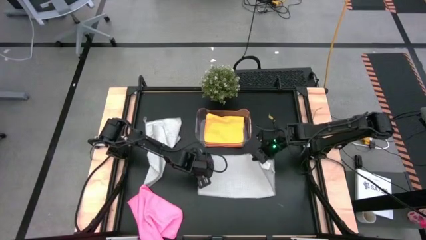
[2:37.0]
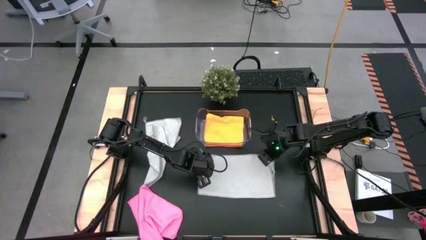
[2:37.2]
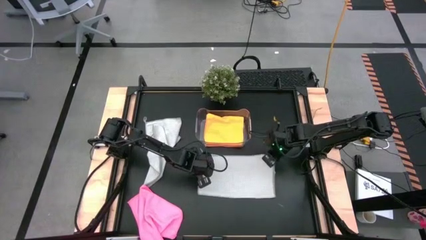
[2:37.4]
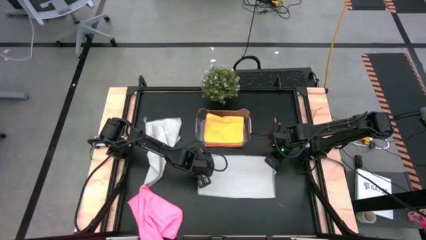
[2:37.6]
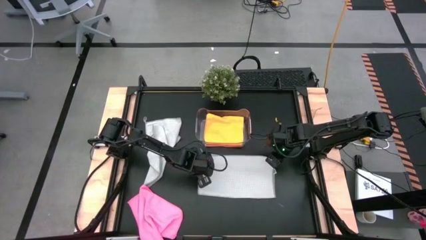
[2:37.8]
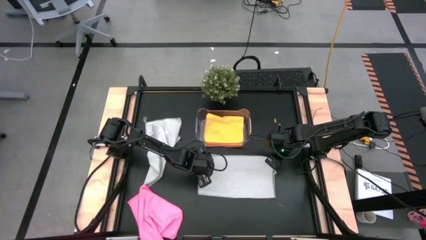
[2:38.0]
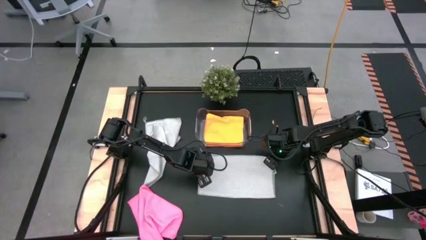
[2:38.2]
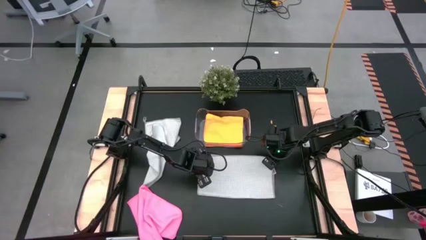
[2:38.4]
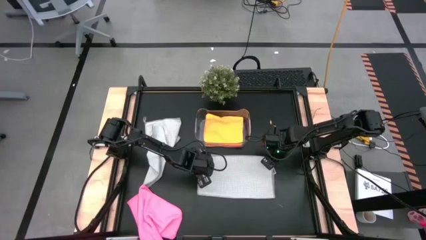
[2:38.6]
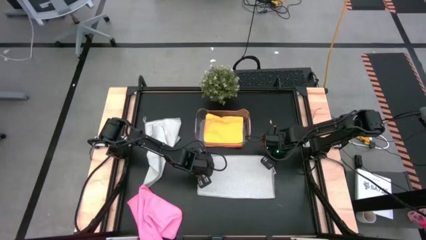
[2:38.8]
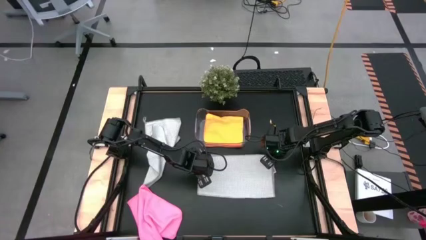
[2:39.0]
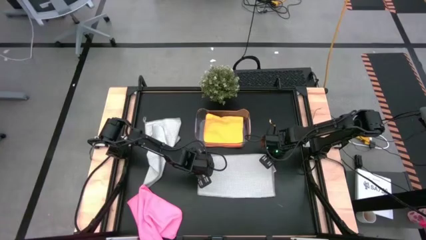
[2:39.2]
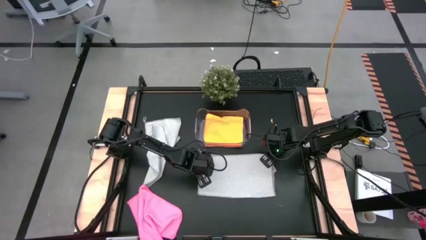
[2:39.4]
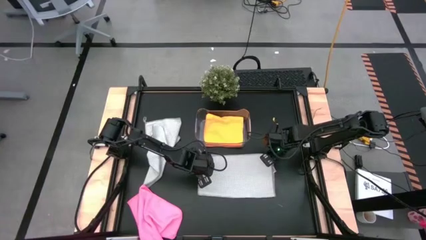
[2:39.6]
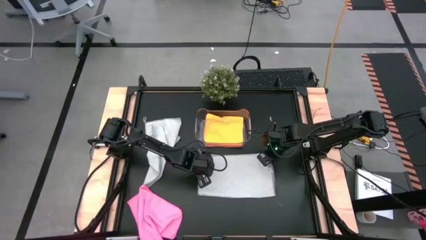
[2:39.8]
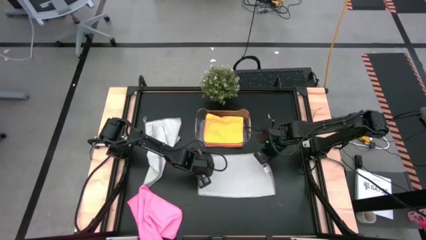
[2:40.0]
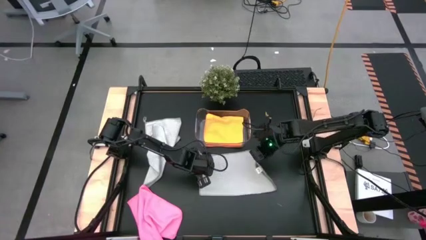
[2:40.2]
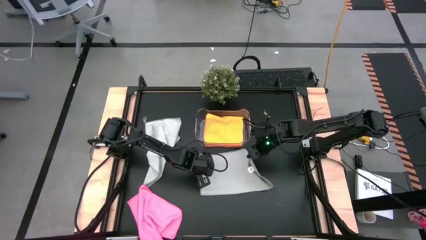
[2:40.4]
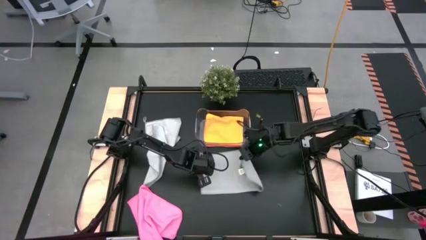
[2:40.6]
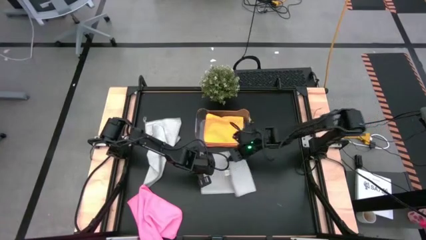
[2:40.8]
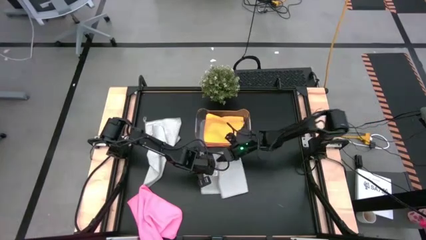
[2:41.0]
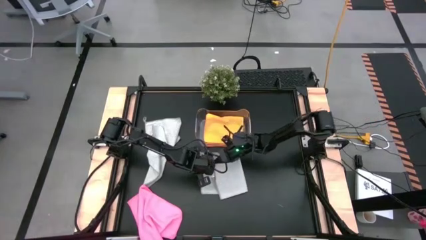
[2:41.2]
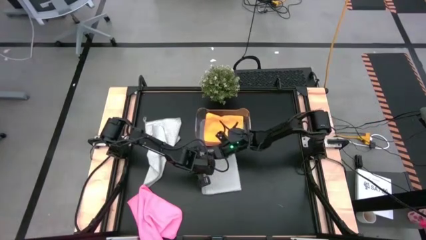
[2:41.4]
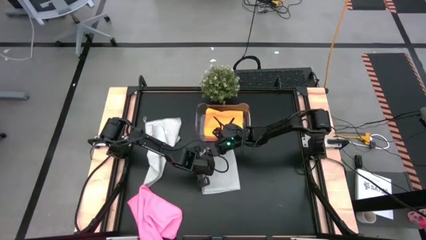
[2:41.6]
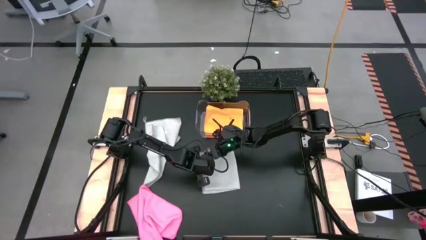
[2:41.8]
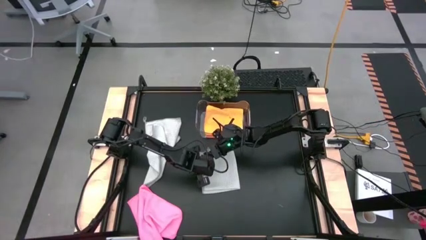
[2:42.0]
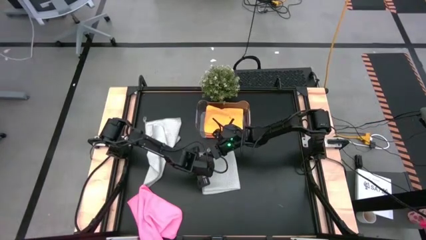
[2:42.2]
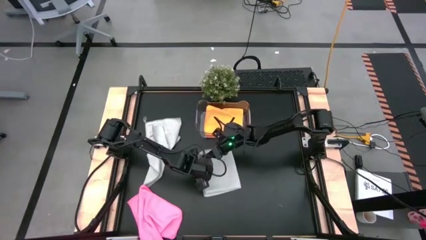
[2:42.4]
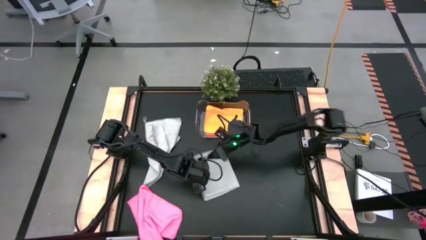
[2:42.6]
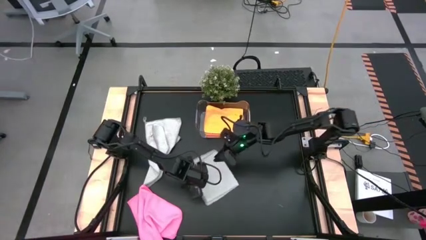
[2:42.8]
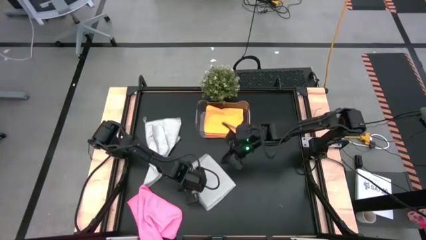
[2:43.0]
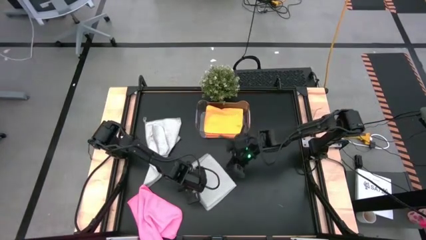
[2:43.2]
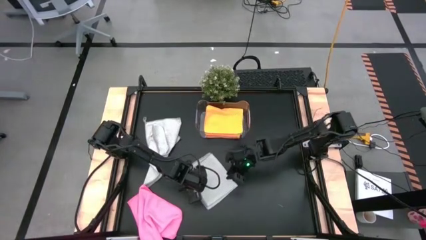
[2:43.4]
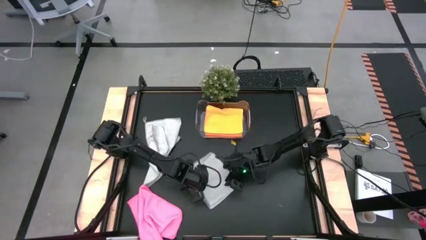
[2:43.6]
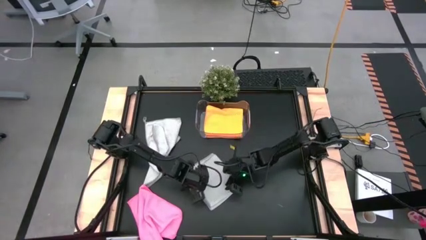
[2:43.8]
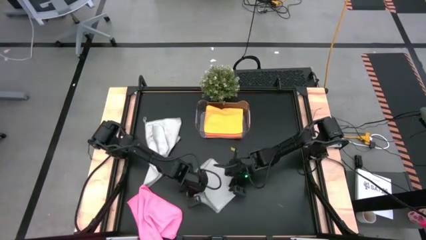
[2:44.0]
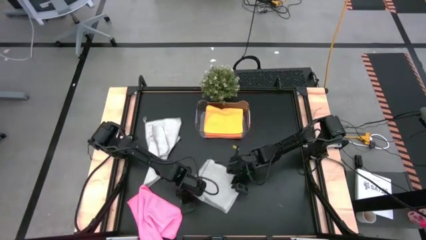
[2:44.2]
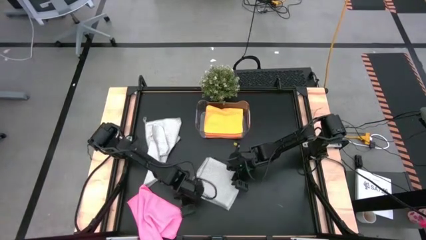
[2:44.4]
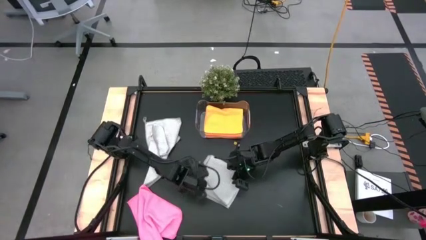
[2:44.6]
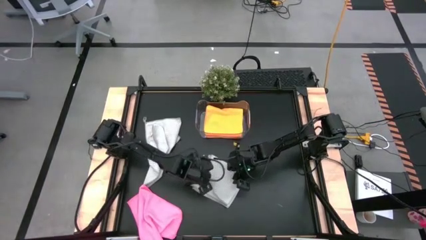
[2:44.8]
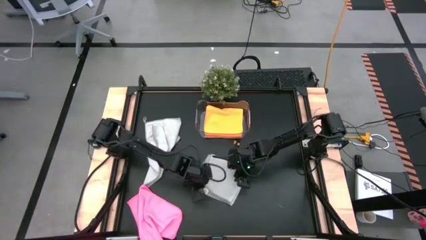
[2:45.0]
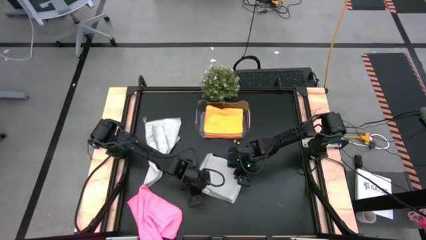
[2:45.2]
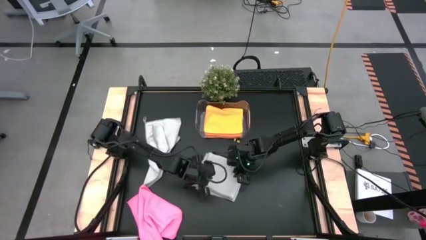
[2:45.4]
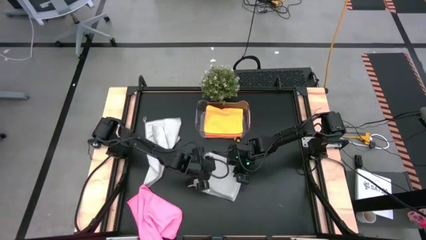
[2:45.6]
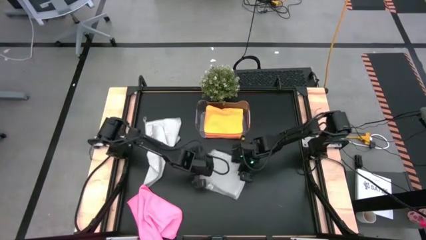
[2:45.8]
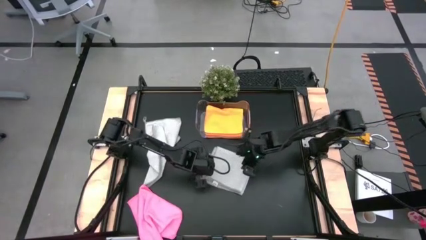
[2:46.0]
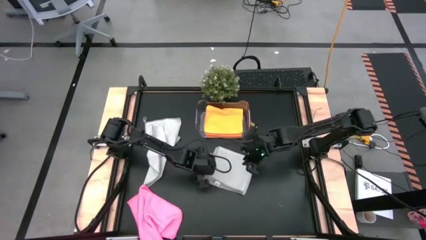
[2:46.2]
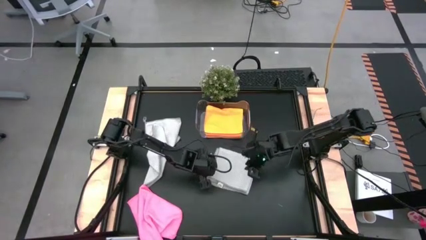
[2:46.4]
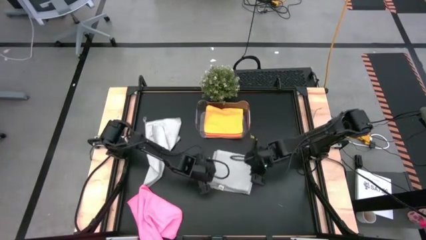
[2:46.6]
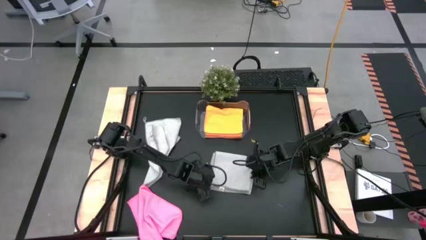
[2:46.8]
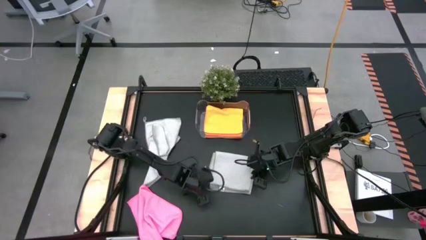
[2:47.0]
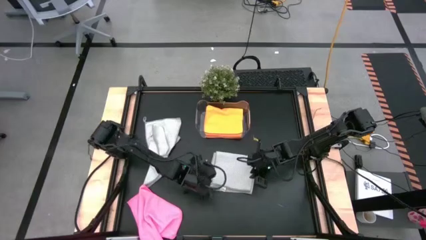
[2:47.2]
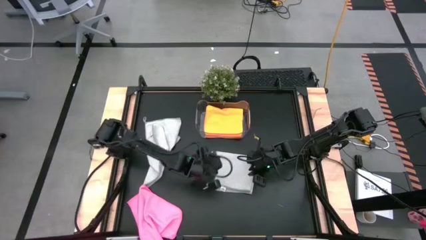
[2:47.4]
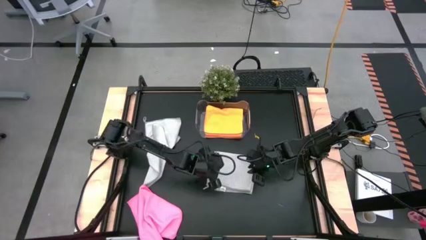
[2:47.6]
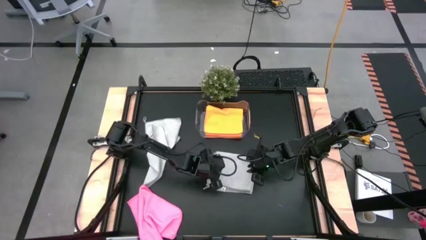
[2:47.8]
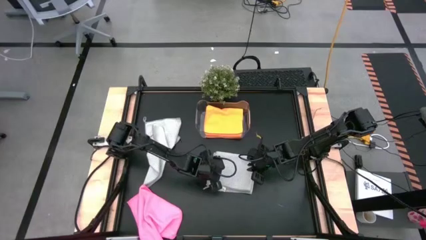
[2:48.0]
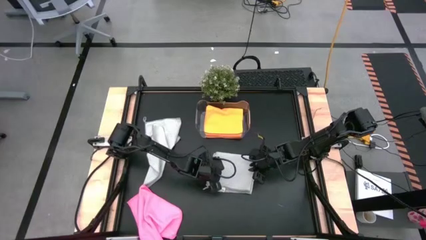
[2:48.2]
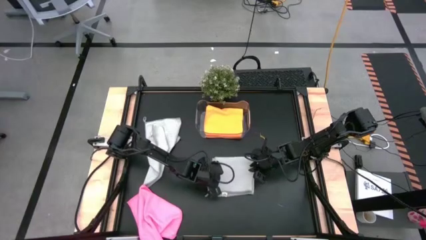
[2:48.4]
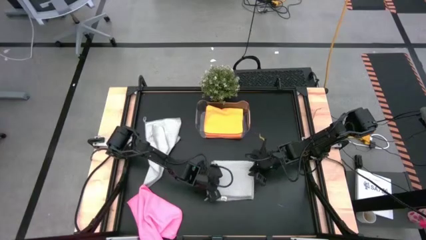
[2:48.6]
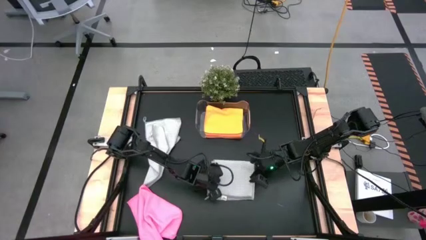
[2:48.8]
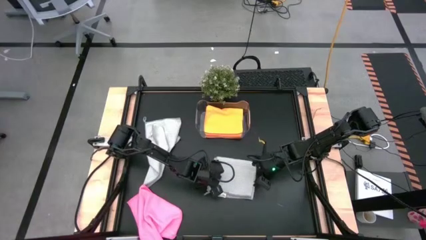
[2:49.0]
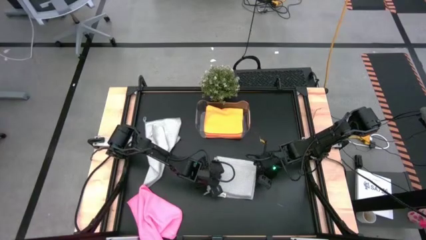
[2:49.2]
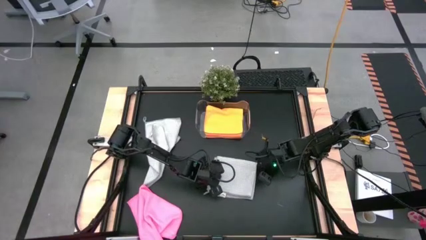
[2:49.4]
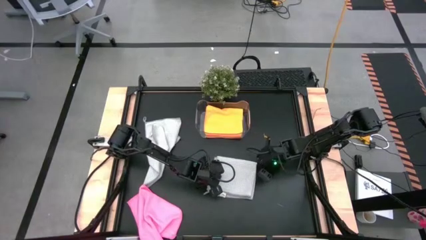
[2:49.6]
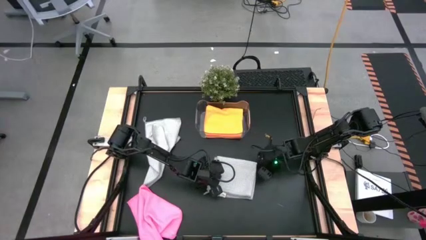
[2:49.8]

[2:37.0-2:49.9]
Task: Fold microfiber towels
Fold the bottom gray microfiber towel on the table
